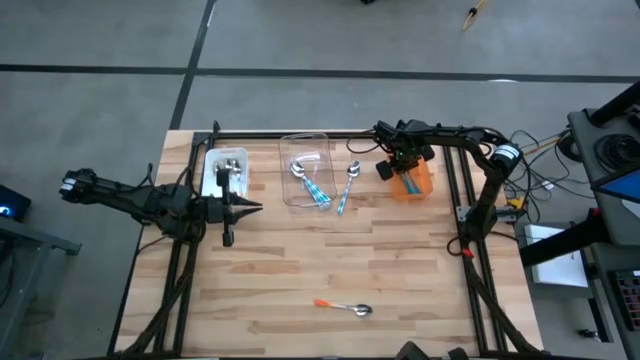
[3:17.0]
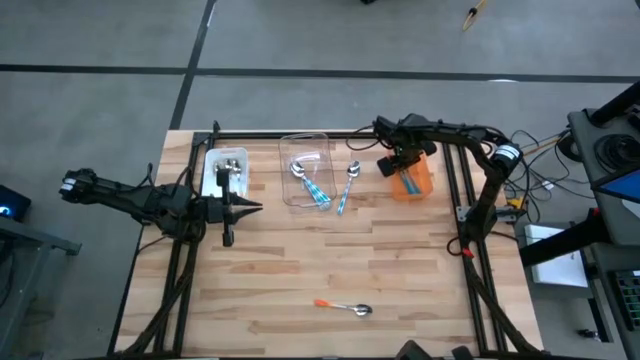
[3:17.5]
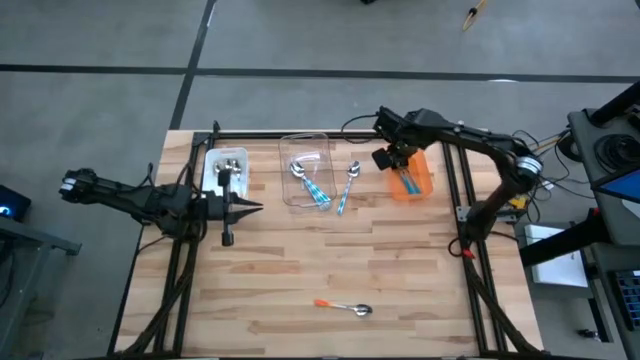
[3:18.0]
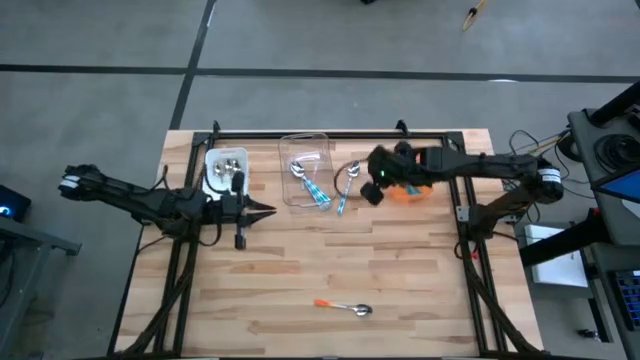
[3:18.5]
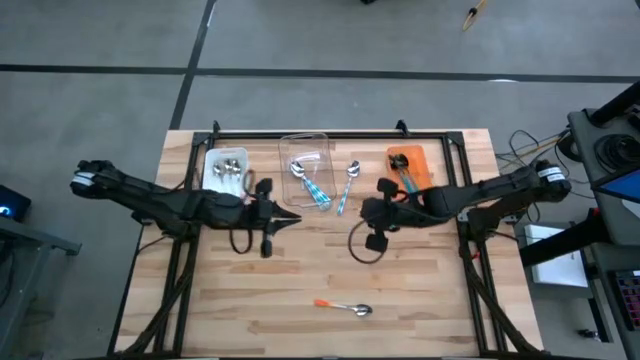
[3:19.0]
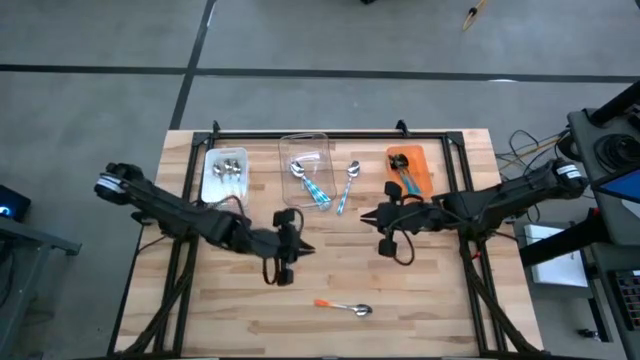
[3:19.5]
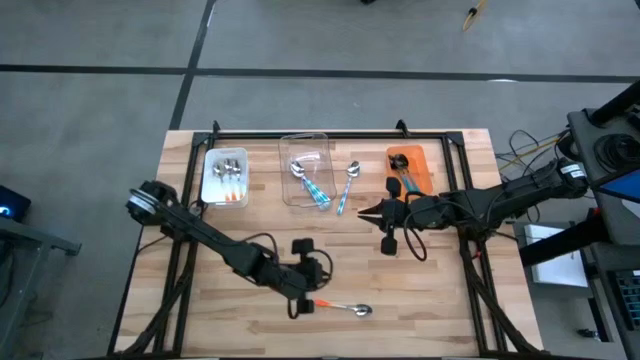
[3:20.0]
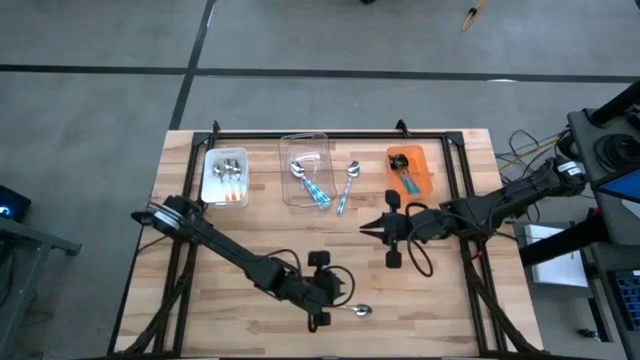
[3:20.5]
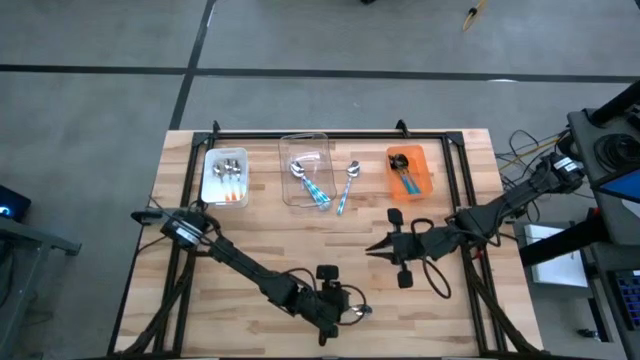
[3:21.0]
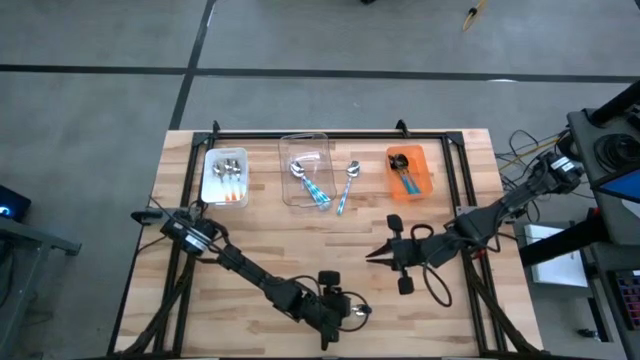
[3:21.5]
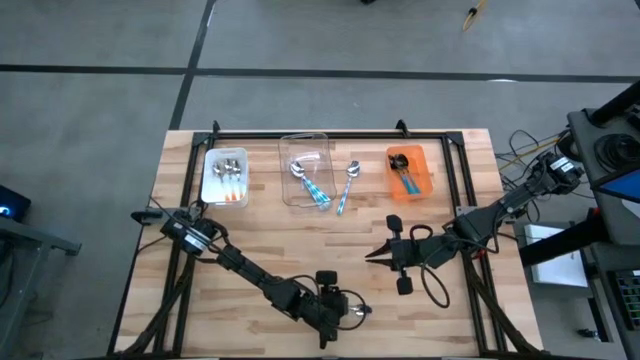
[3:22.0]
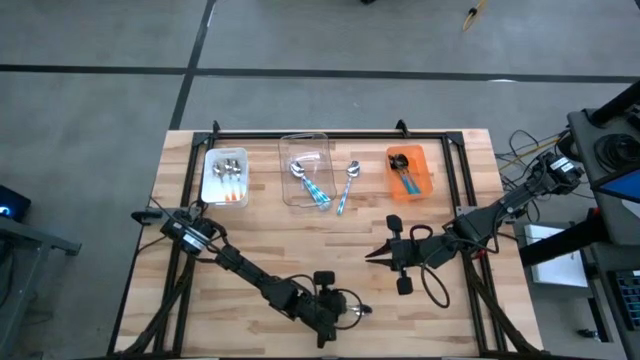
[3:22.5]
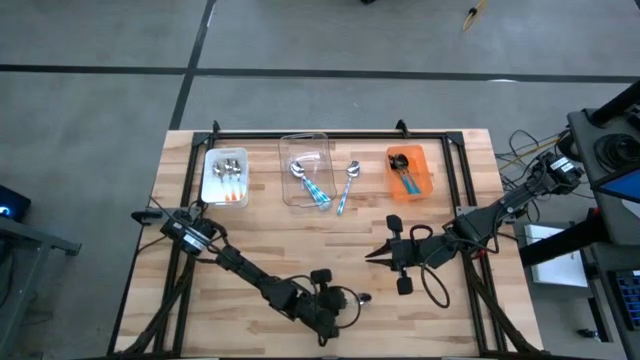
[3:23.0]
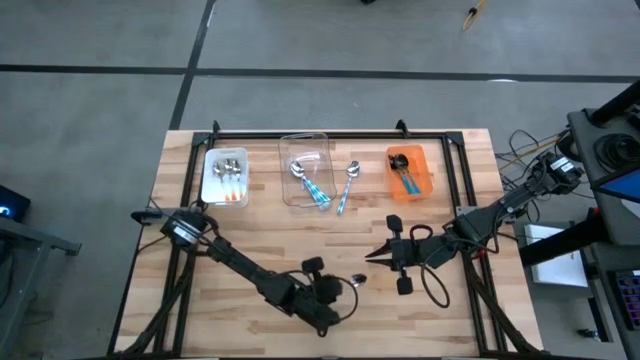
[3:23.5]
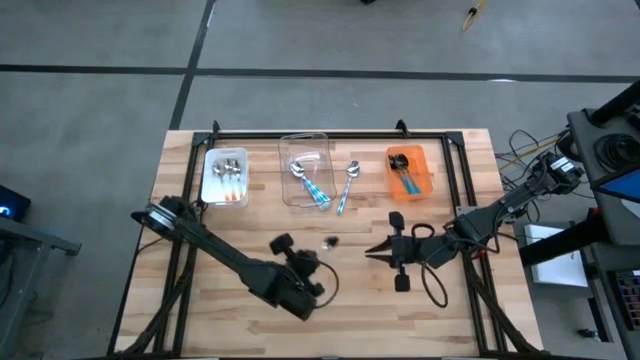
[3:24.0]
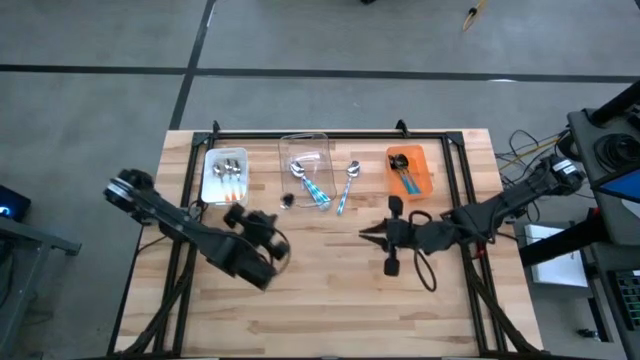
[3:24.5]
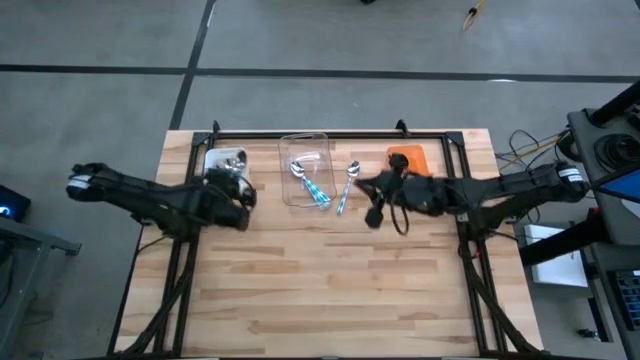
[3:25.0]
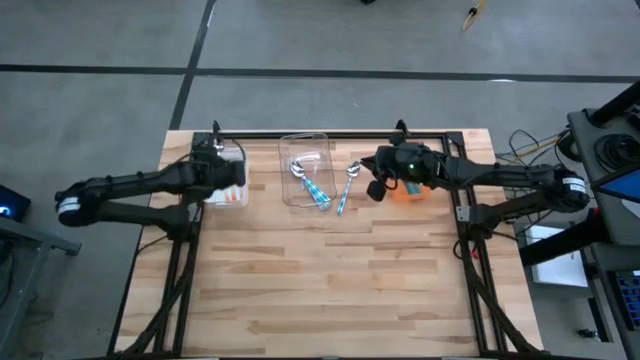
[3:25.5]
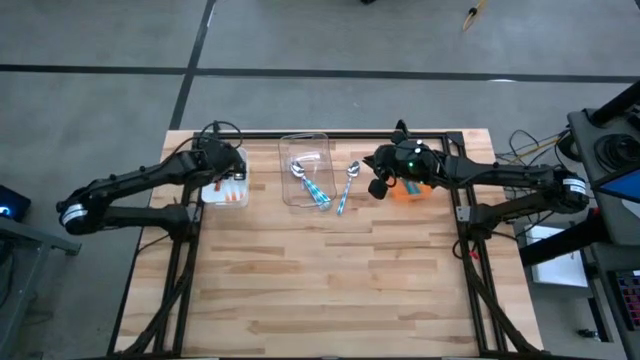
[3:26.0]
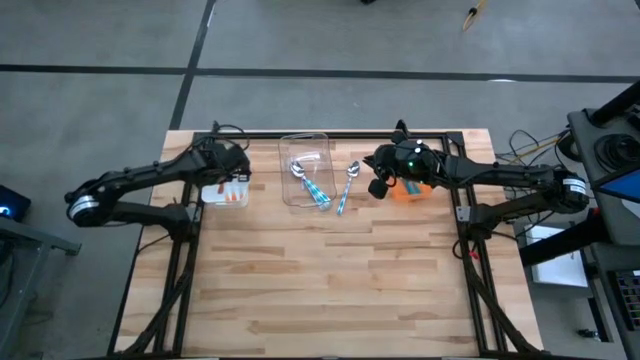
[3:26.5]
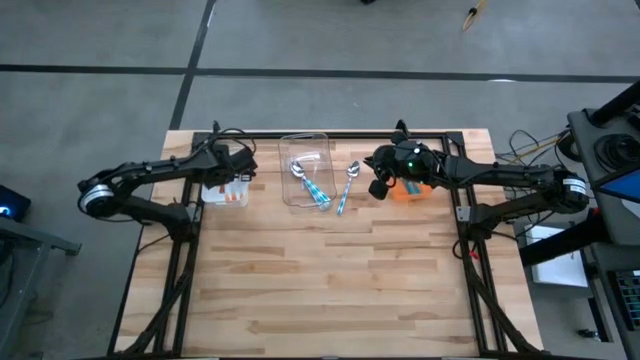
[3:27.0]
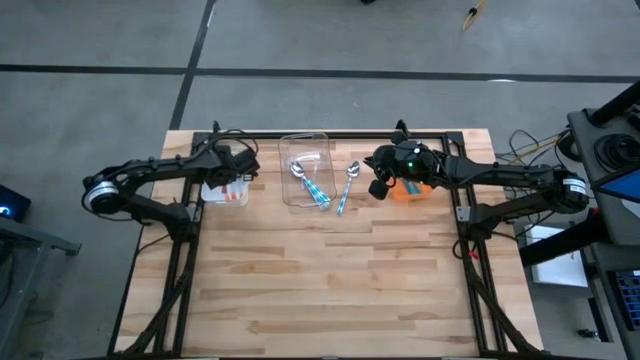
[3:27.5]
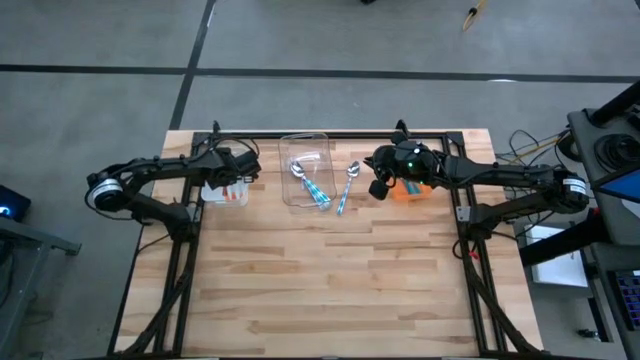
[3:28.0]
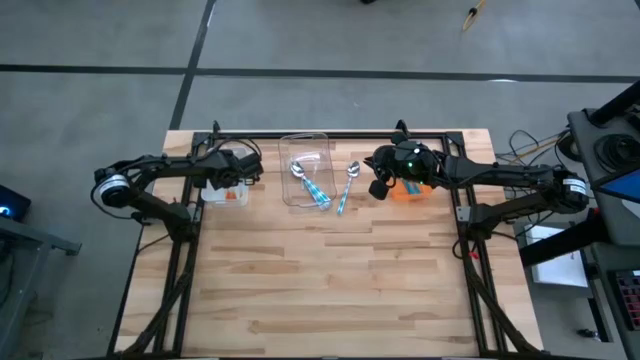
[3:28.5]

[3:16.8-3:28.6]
Task: Sort silverware by color (type)
Put the orange spoon into the white bin

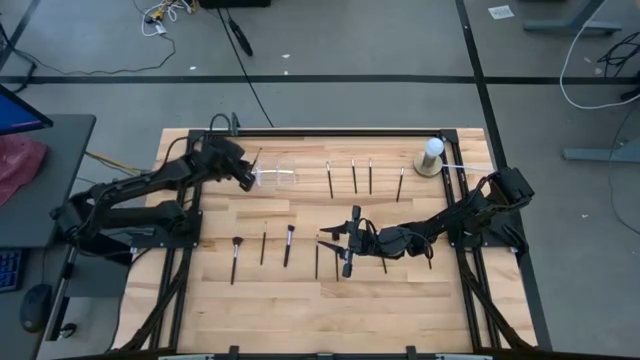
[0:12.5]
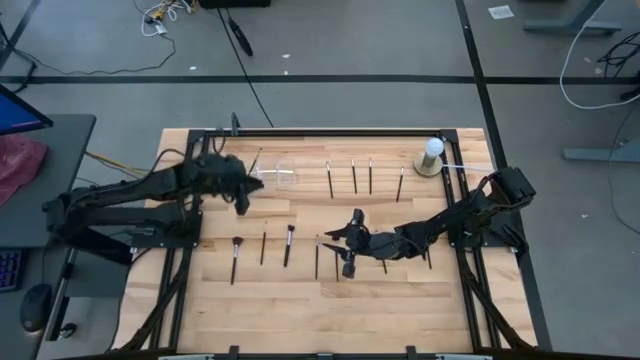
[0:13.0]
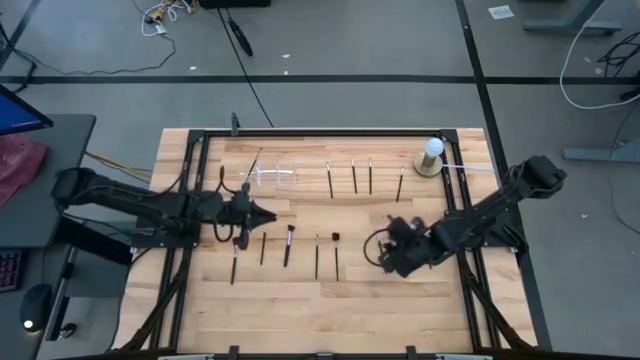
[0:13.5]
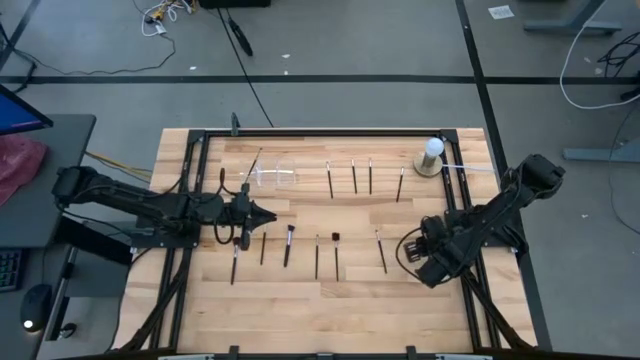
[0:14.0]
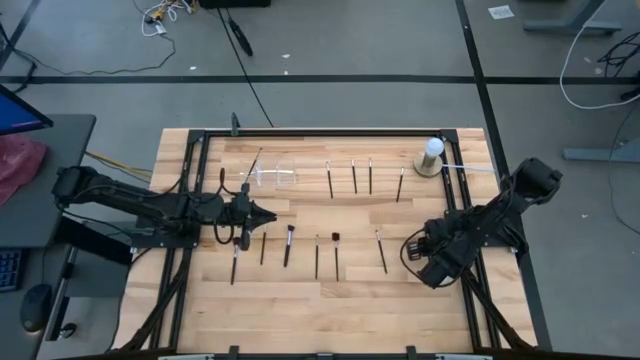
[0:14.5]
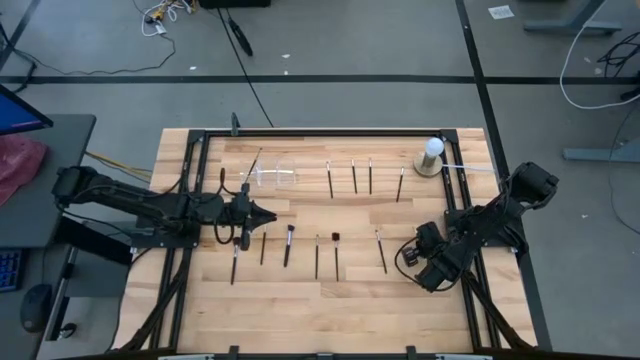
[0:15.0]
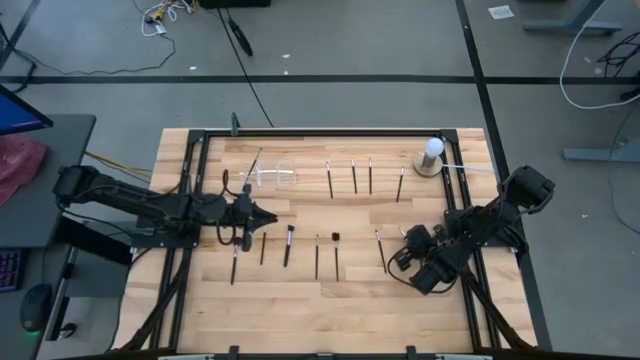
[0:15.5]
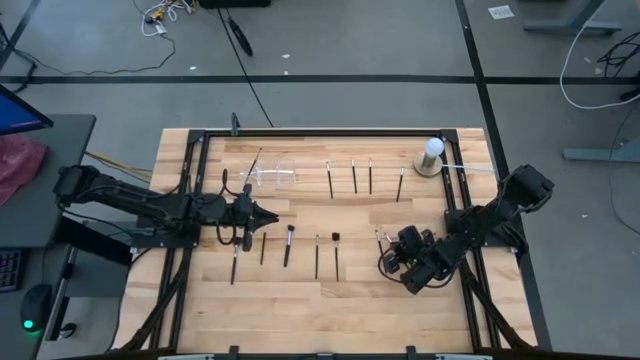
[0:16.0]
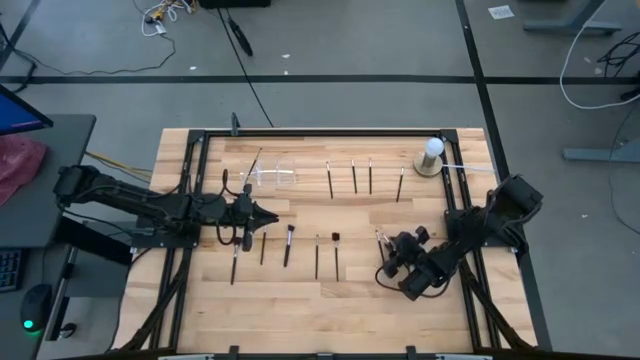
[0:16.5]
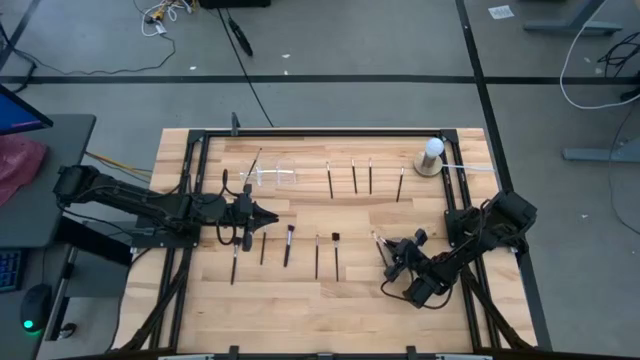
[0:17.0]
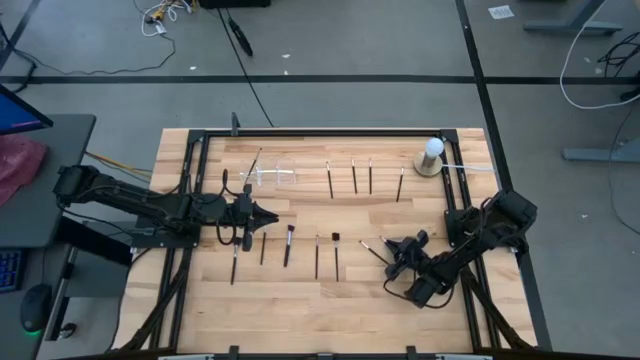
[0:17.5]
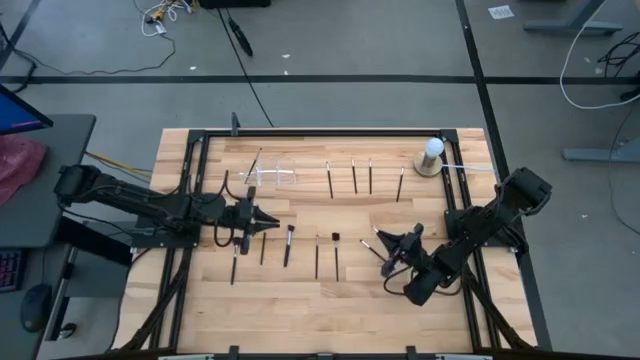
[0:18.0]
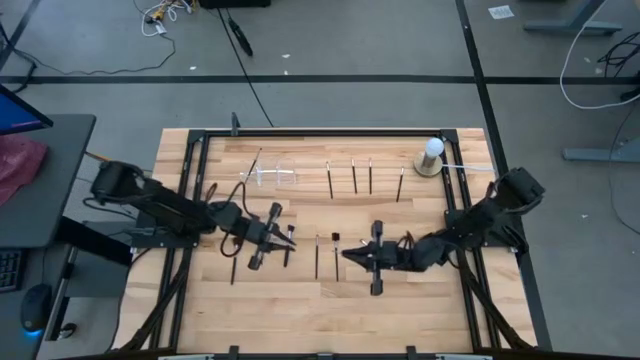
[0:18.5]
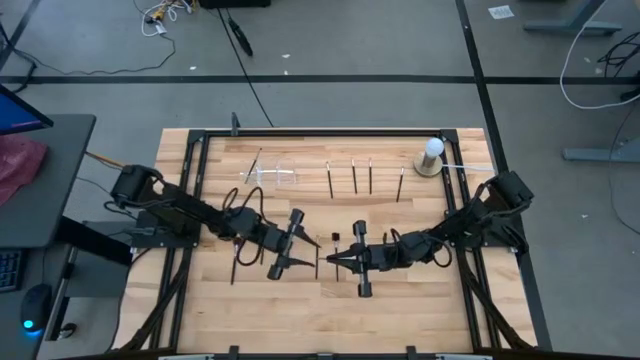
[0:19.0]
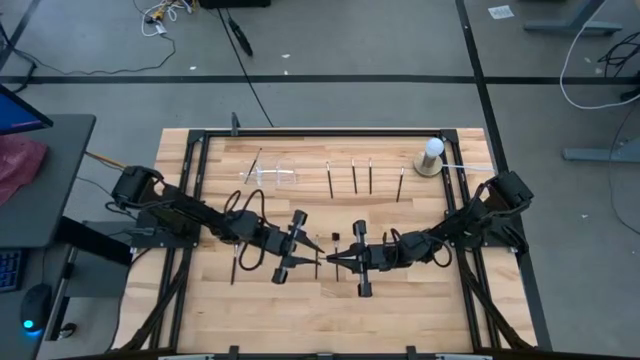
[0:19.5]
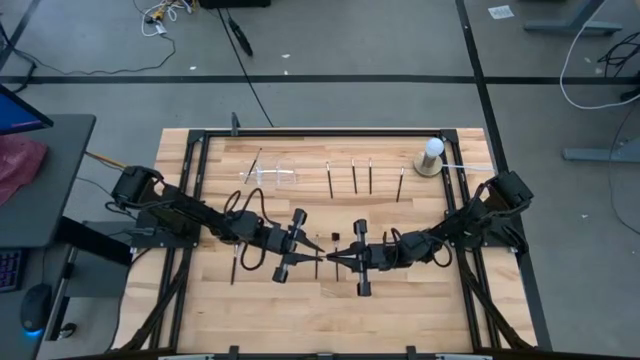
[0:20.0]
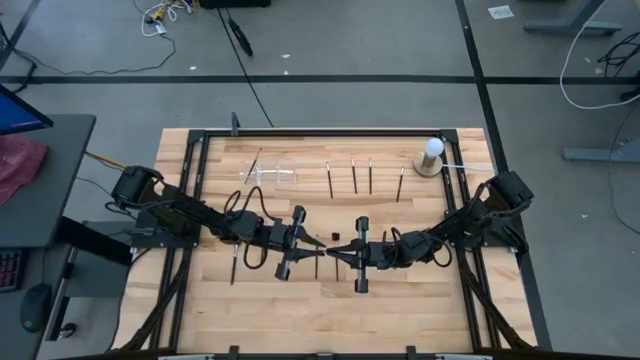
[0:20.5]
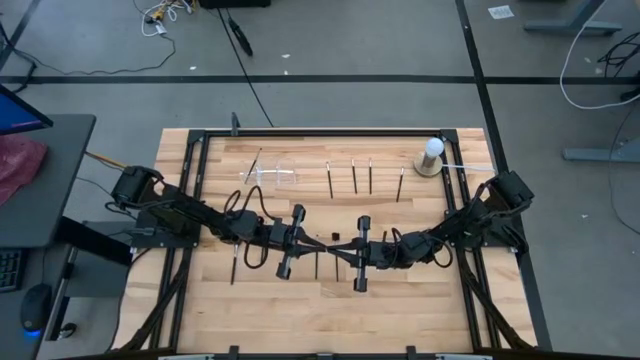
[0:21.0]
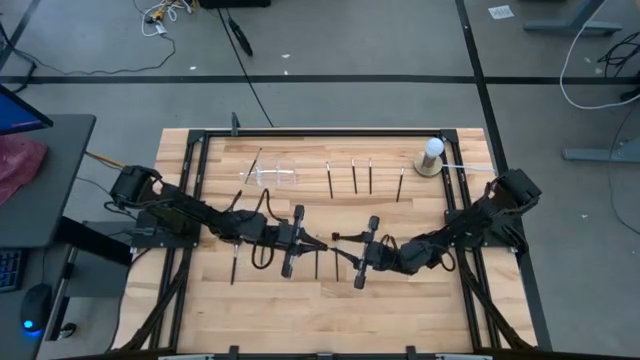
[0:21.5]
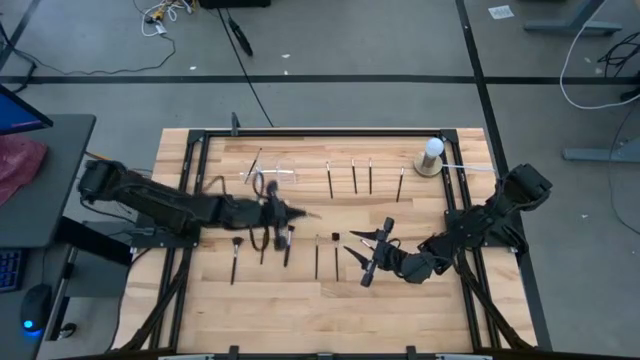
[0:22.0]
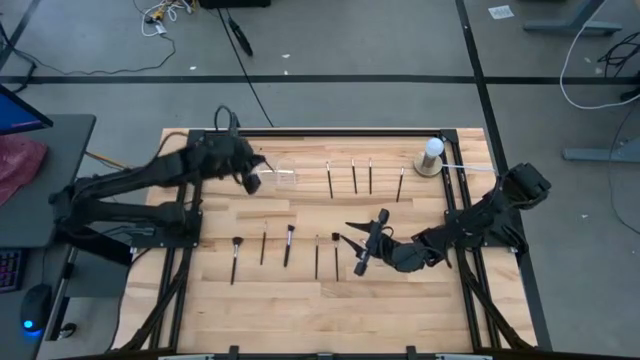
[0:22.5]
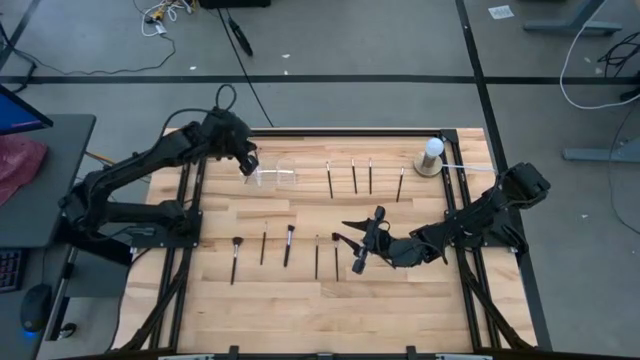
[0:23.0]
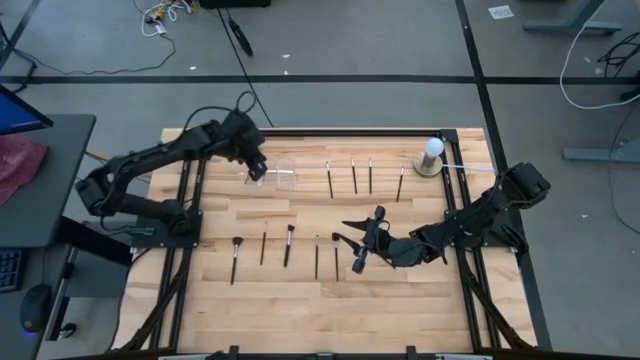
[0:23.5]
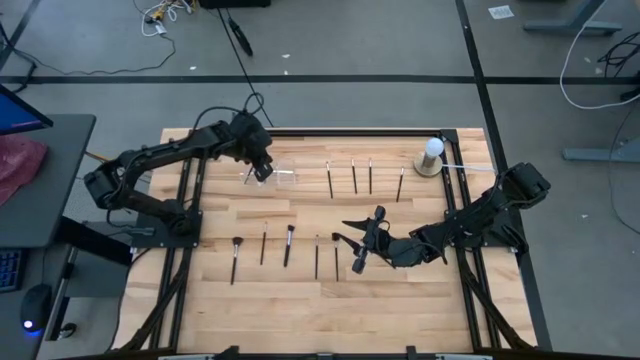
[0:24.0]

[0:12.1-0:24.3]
Task: Put items in baskets/containers
Put the eyeshadow brush into the transparent organizer
